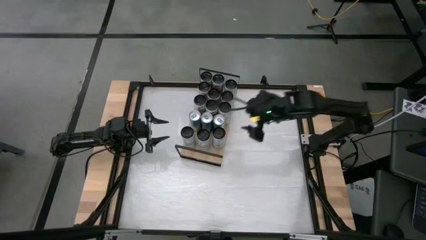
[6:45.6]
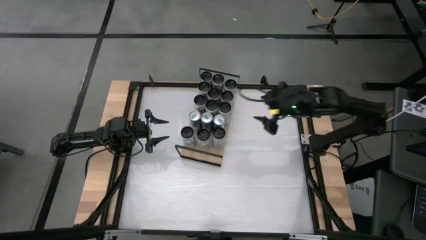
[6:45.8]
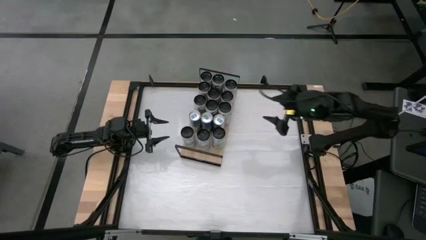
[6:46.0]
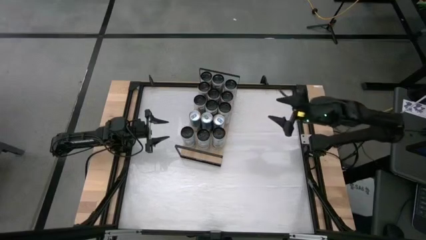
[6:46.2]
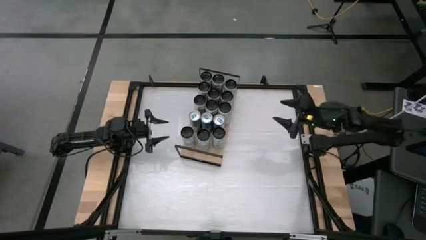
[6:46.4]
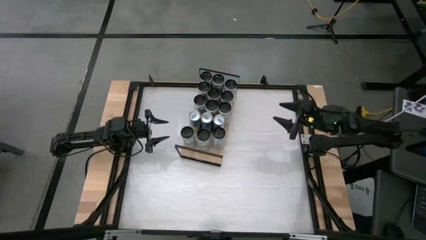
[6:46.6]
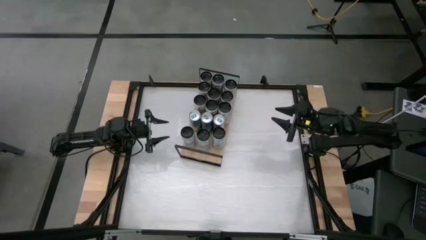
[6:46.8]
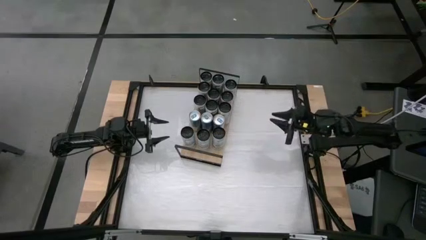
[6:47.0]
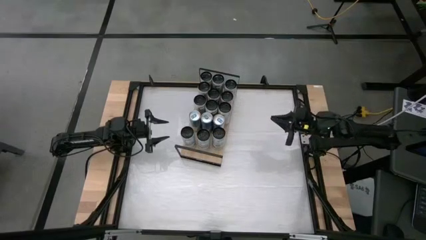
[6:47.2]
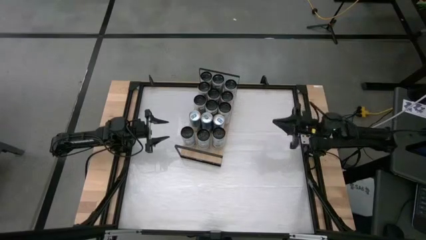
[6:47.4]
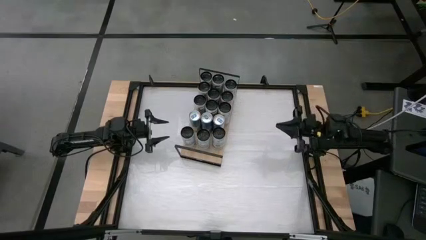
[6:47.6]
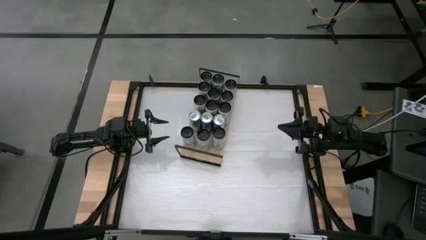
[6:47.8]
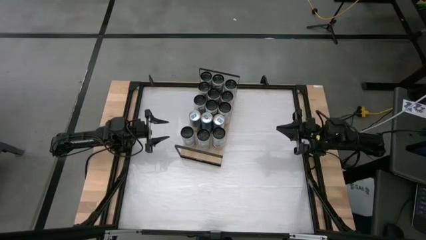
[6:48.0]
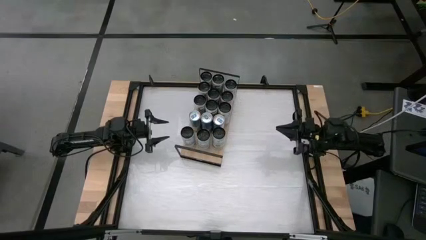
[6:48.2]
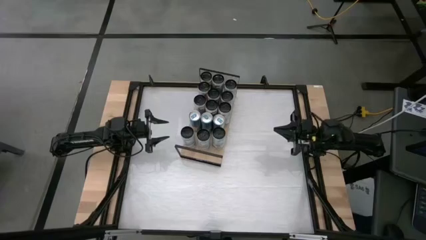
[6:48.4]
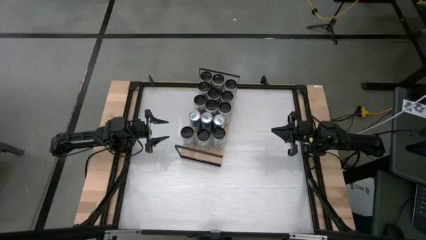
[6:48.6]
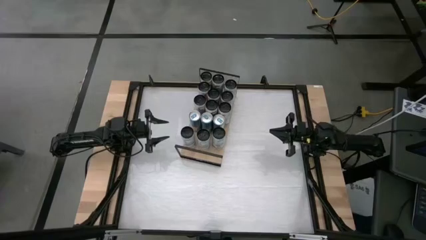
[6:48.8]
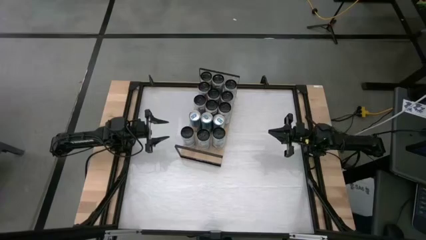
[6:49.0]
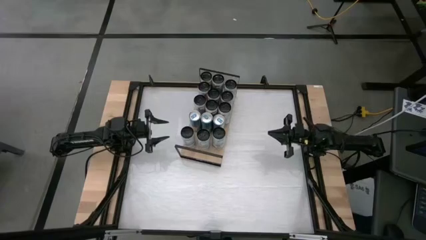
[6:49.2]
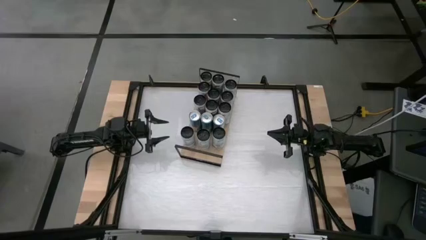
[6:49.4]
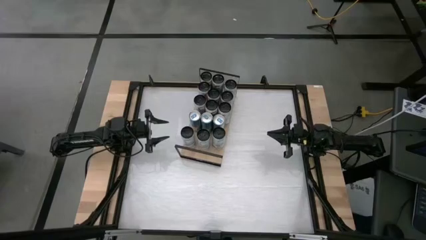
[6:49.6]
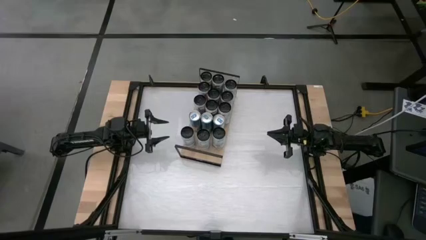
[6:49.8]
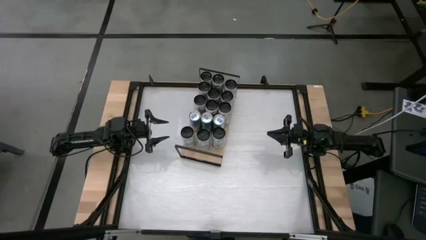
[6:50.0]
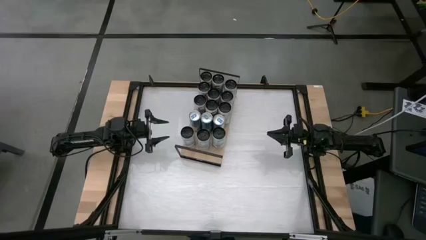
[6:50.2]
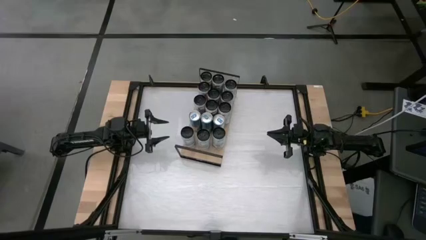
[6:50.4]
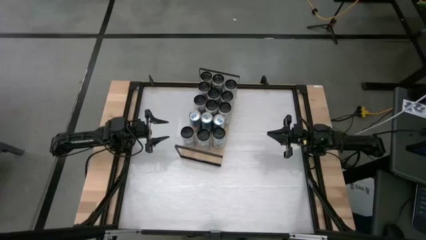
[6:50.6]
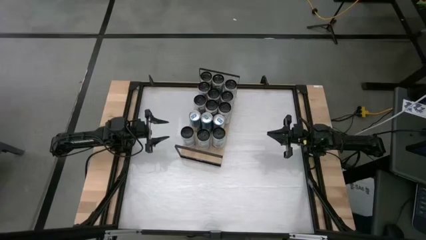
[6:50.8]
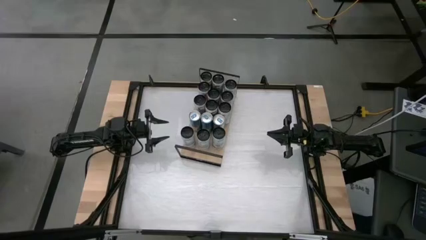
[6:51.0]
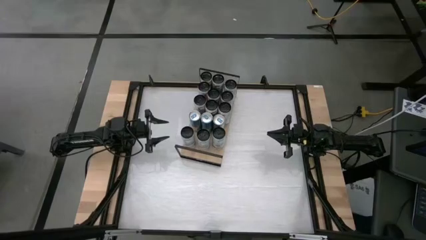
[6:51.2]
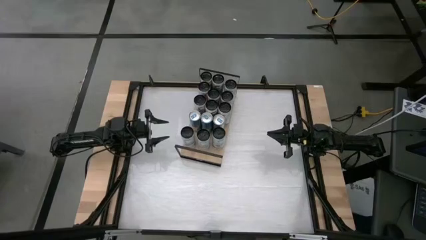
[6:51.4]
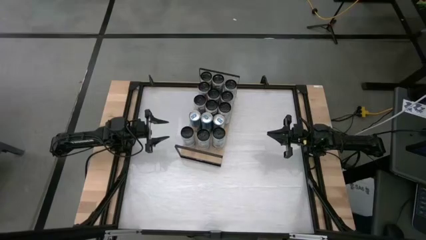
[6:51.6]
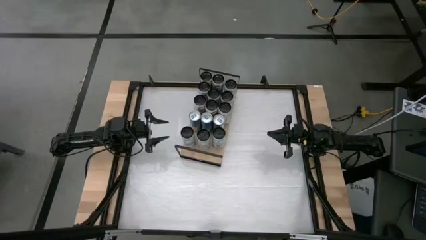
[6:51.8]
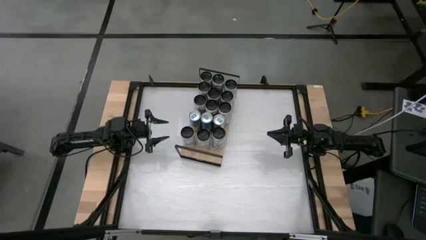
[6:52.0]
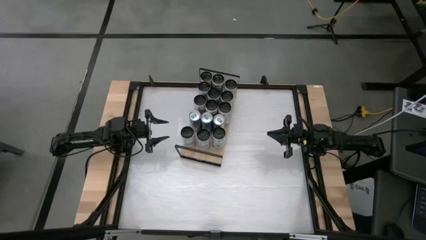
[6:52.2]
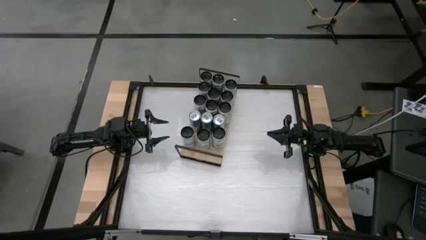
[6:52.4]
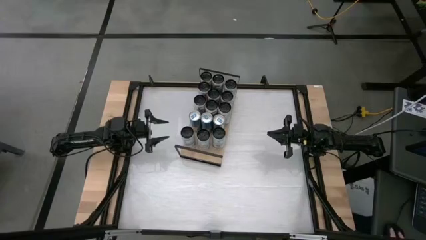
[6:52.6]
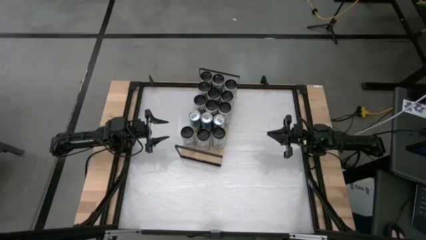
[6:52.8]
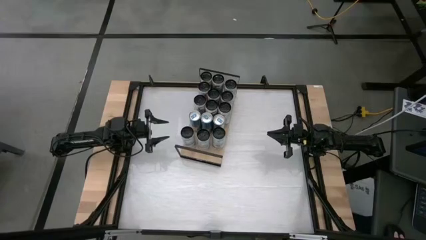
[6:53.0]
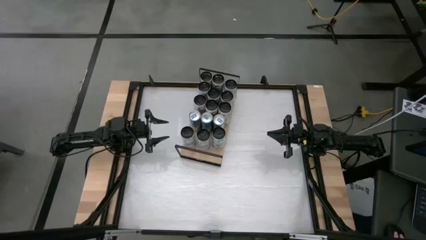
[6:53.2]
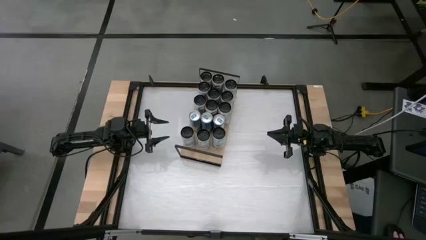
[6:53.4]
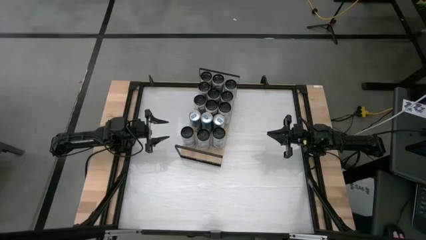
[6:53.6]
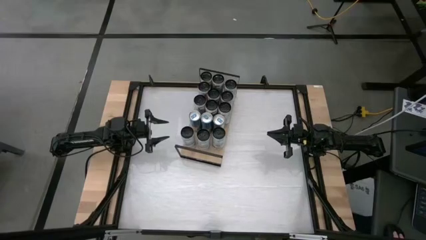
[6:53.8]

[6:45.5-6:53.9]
Task: Place canned beverage on shelf
Return to Home Position

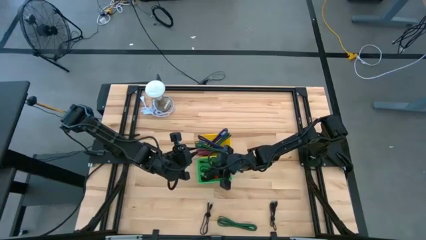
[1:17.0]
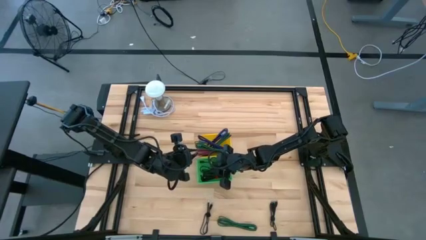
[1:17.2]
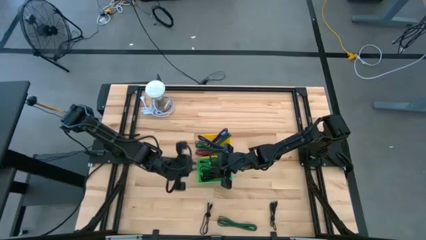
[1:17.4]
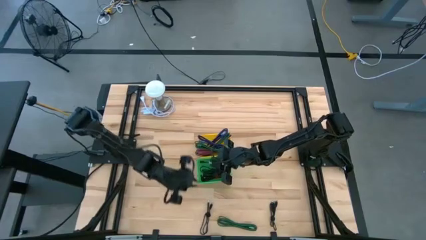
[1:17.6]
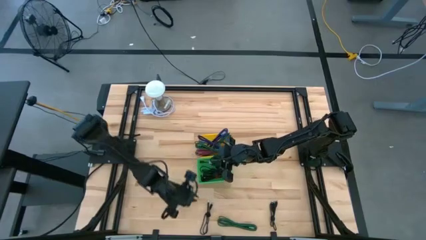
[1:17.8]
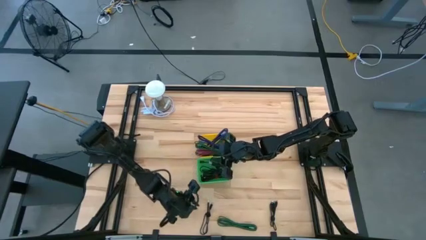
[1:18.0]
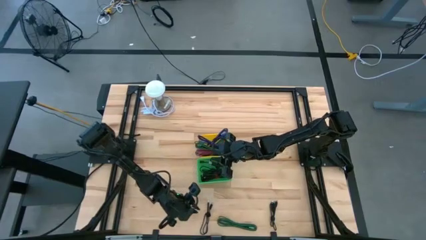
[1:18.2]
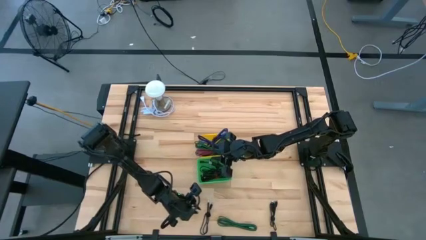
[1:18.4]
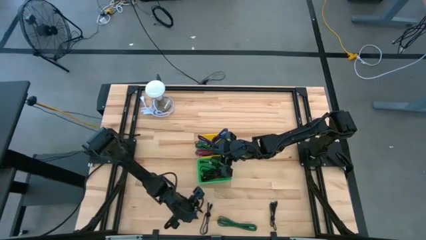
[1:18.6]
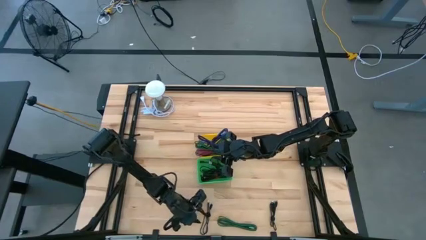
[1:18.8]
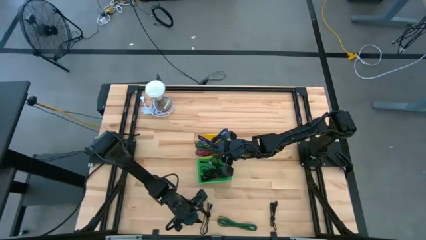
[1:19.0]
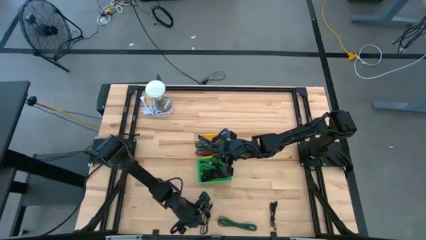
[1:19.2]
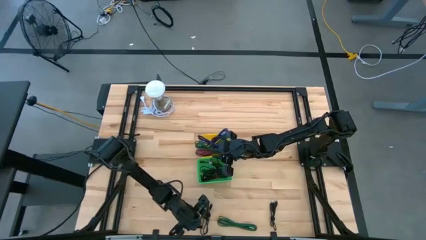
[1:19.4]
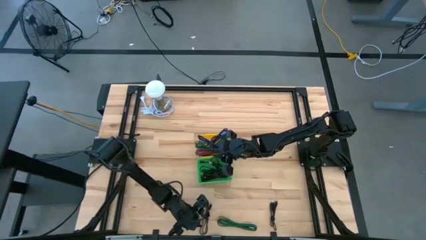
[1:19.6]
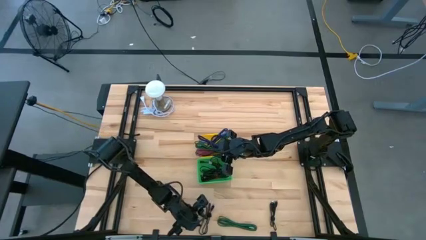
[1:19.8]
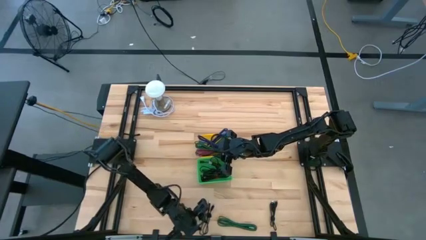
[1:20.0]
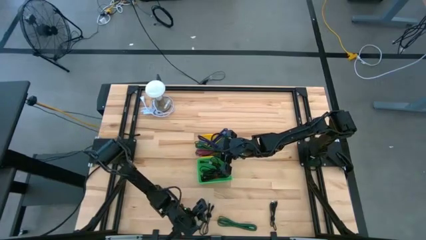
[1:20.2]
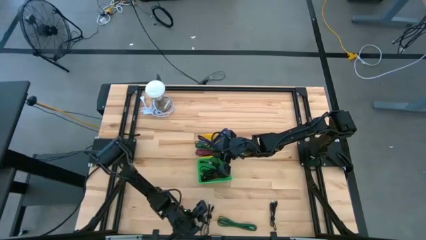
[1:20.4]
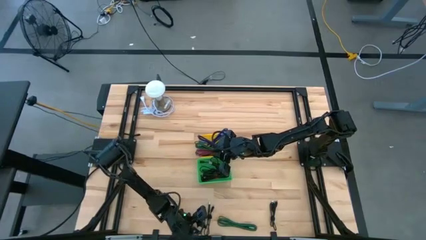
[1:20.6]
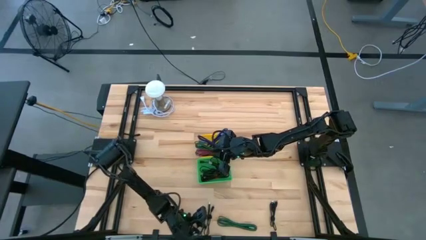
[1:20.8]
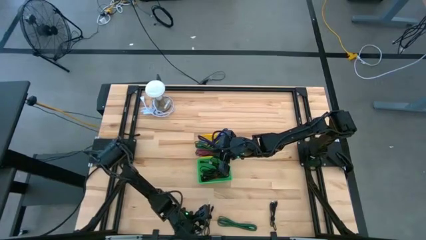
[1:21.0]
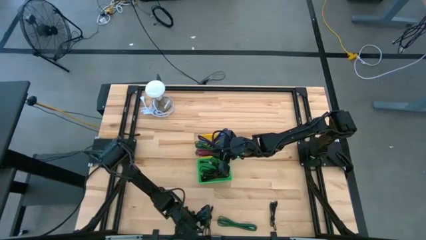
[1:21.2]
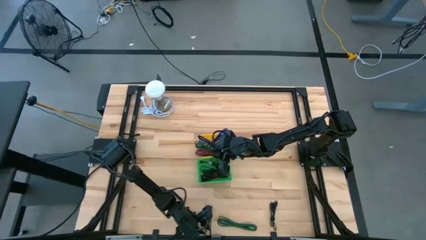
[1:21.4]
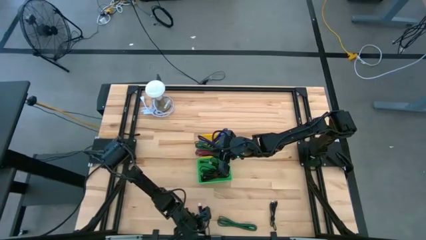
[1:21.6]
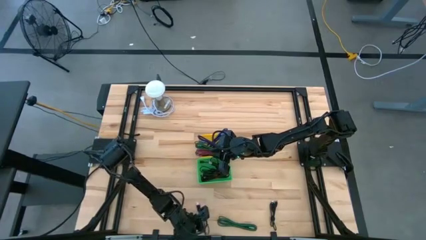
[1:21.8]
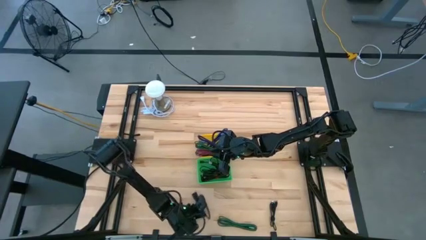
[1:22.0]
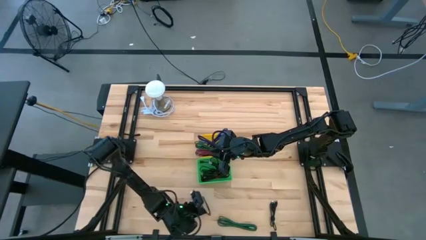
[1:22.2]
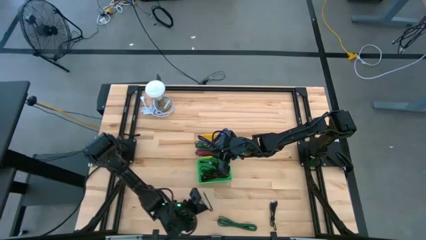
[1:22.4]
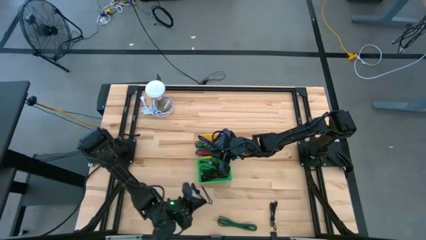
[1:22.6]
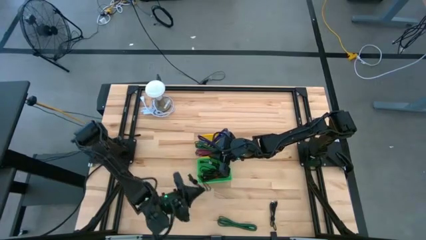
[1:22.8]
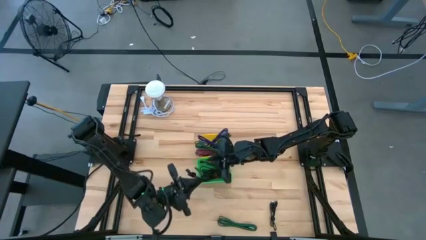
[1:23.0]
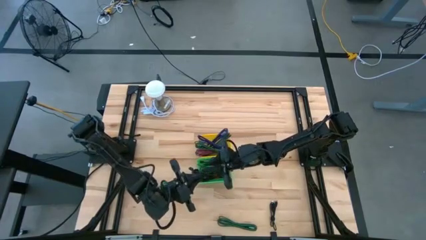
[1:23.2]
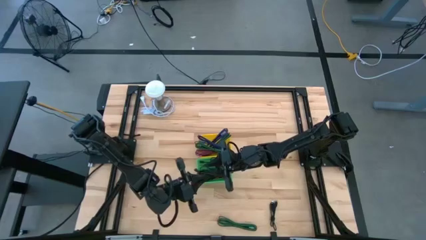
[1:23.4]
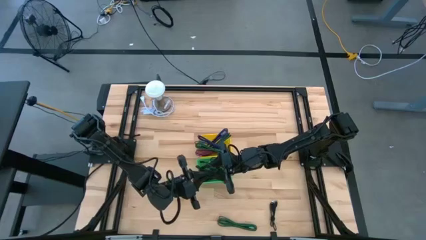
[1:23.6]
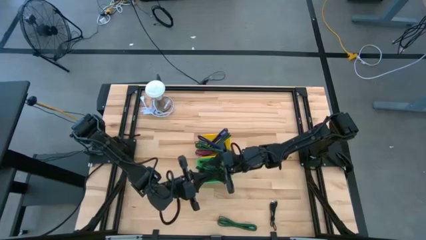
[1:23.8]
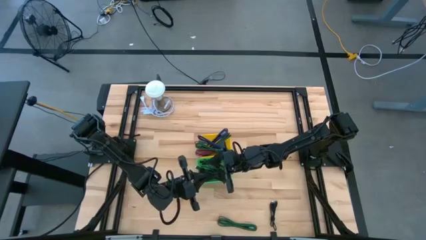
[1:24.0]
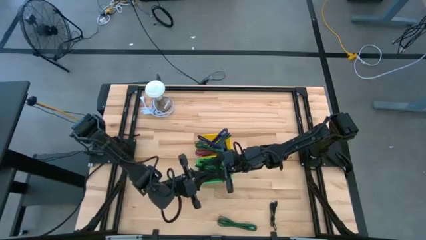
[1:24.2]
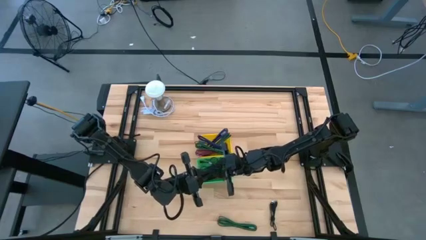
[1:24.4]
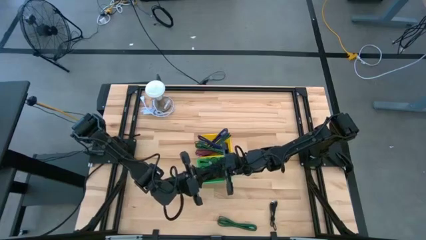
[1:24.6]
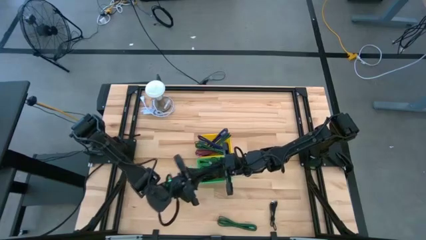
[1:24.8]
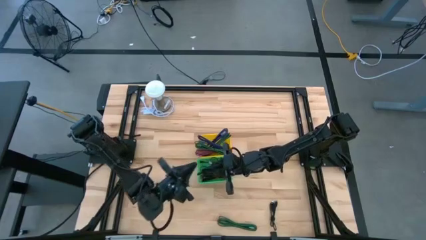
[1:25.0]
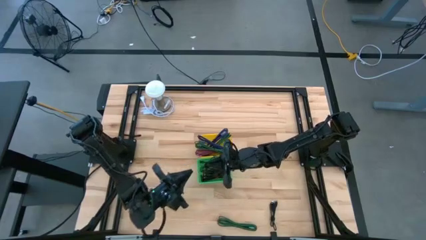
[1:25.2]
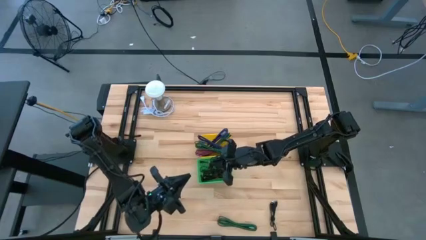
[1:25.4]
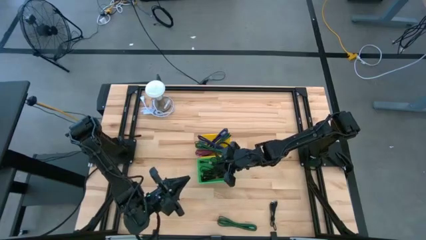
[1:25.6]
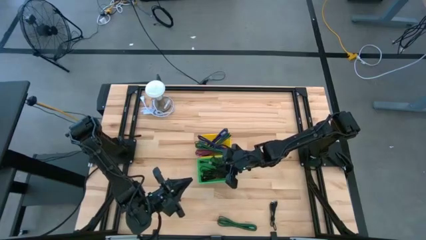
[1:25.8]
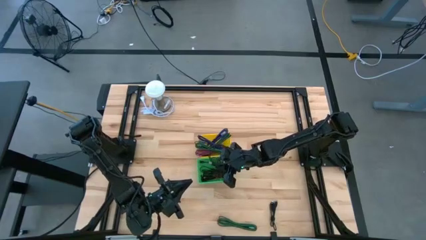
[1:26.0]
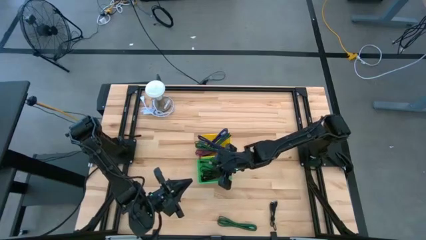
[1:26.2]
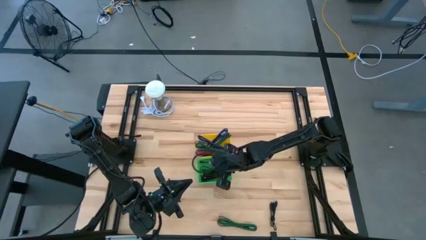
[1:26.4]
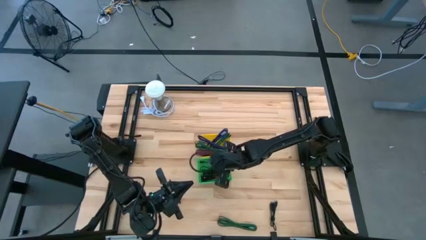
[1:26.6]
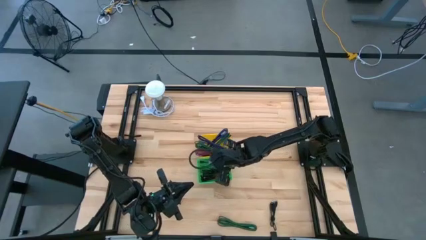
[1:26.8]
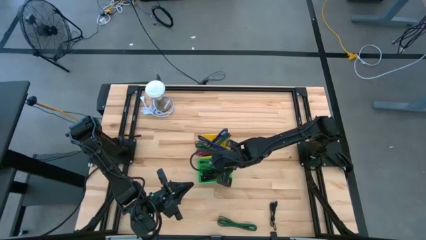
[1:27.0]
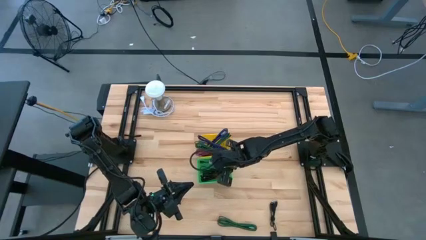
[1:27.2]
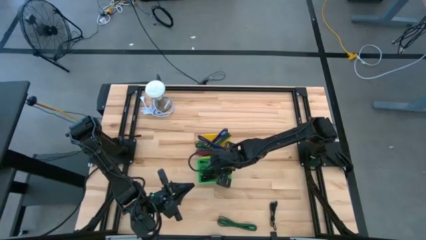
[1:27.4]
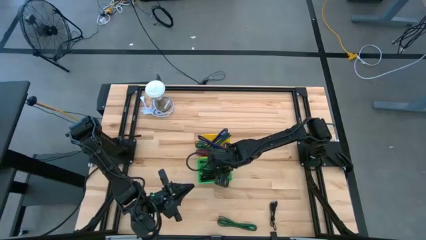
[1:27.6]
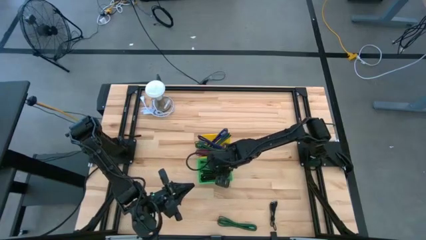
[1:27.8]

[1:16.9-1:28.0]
Task: Pick & Place USB Port
Put the black USB cable into the green bin
